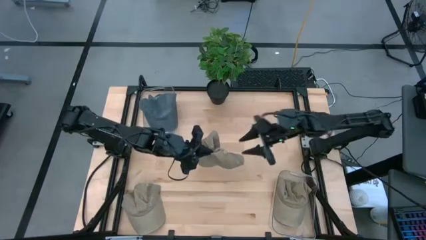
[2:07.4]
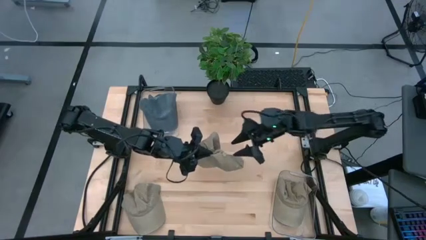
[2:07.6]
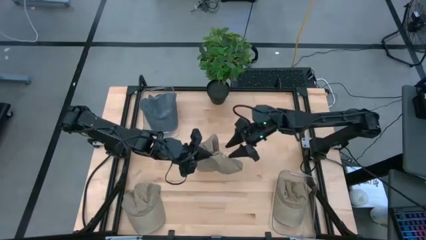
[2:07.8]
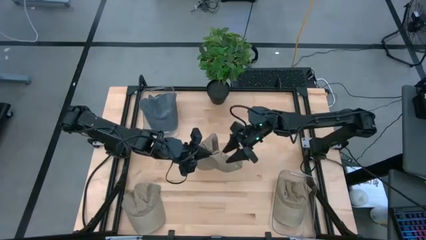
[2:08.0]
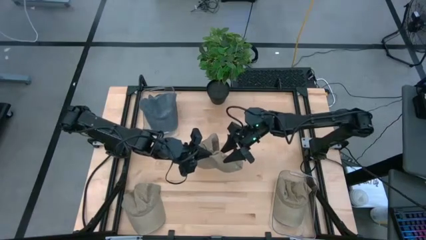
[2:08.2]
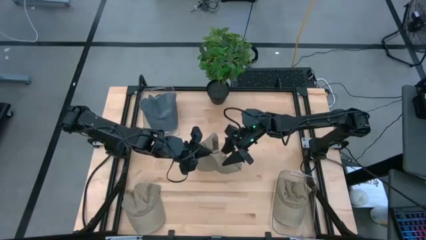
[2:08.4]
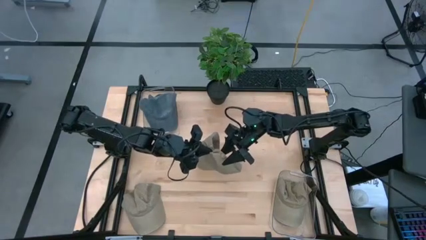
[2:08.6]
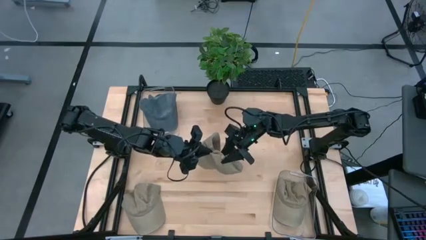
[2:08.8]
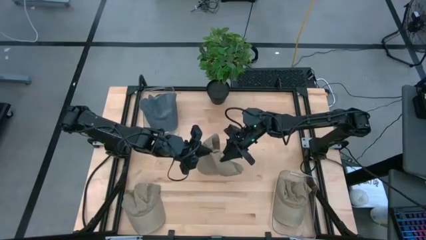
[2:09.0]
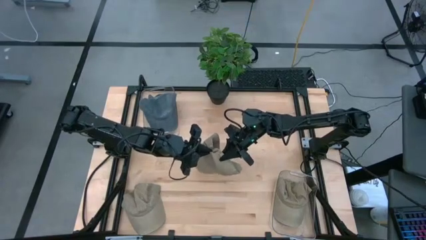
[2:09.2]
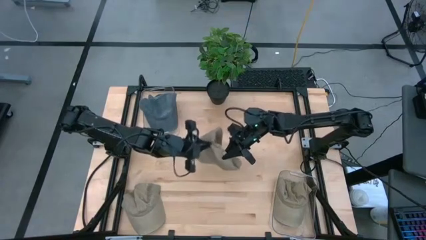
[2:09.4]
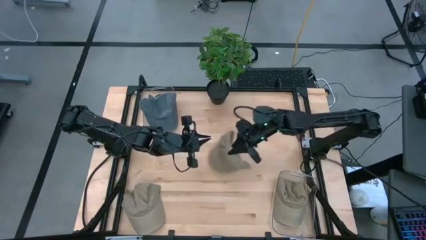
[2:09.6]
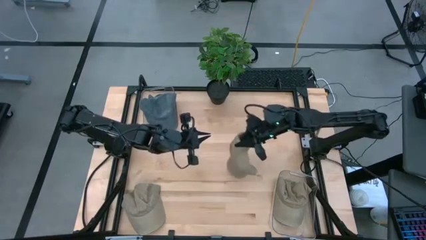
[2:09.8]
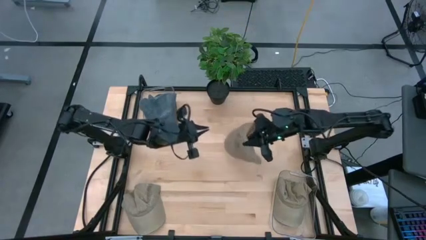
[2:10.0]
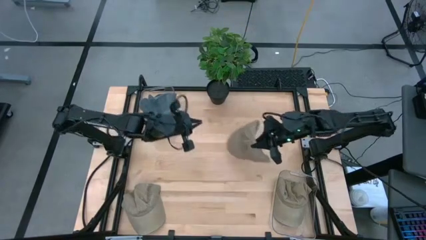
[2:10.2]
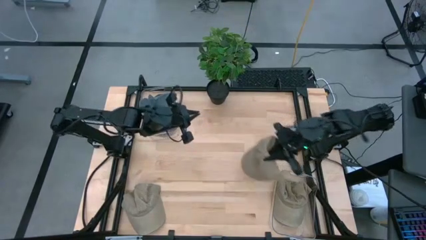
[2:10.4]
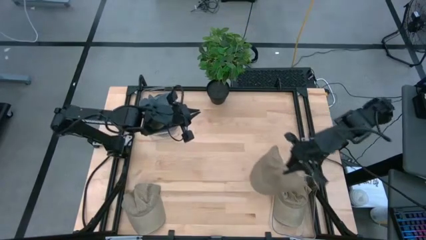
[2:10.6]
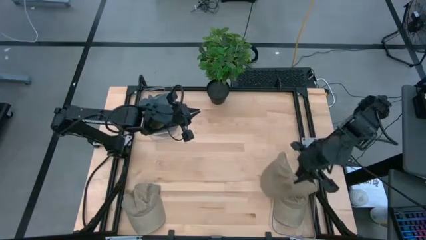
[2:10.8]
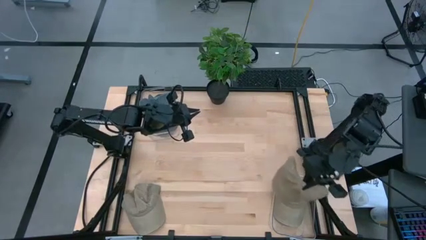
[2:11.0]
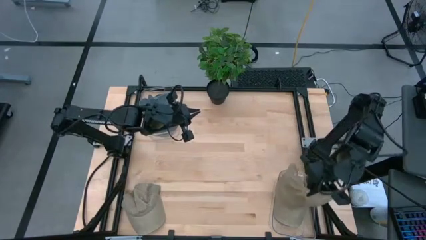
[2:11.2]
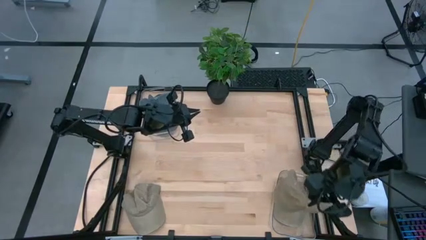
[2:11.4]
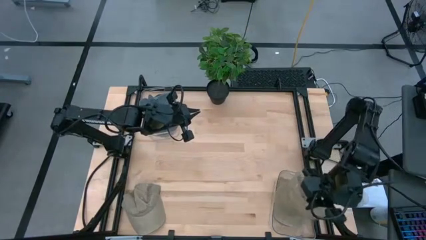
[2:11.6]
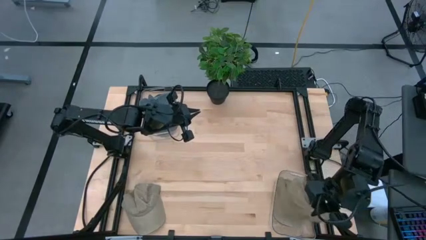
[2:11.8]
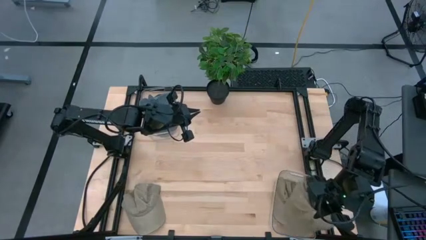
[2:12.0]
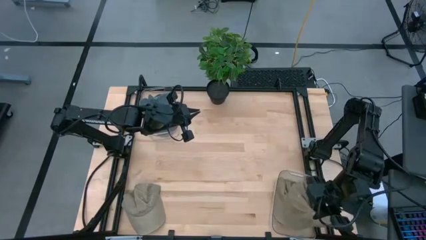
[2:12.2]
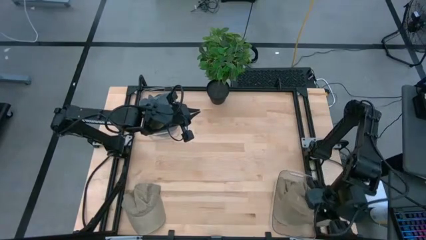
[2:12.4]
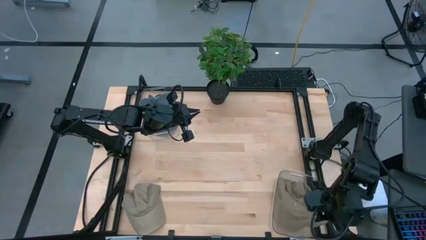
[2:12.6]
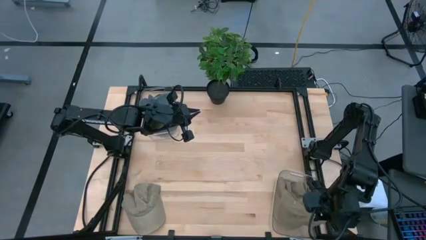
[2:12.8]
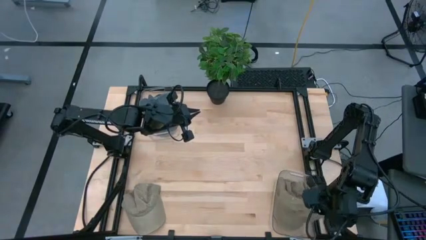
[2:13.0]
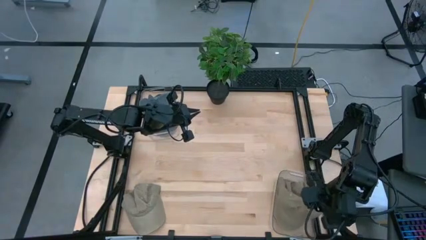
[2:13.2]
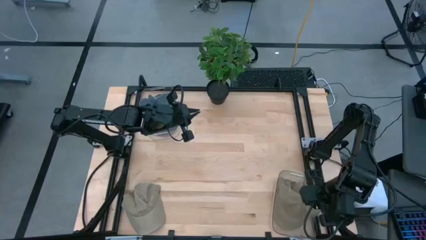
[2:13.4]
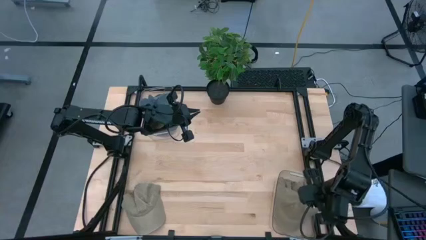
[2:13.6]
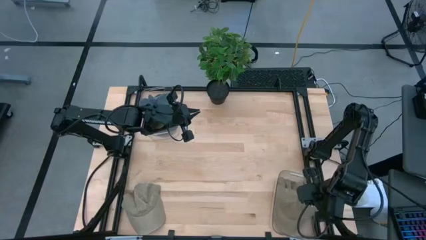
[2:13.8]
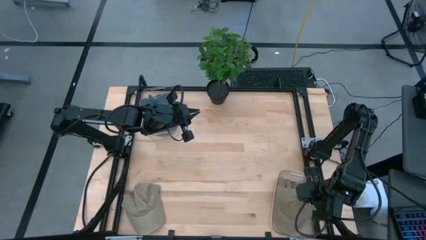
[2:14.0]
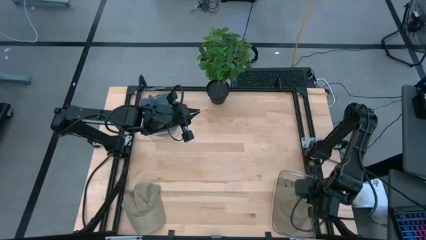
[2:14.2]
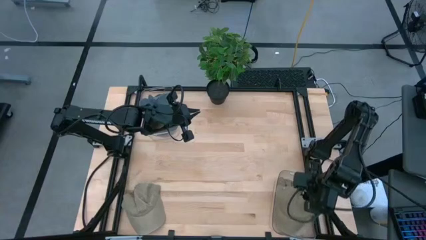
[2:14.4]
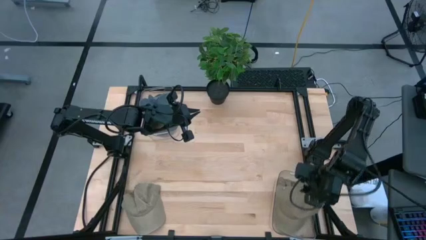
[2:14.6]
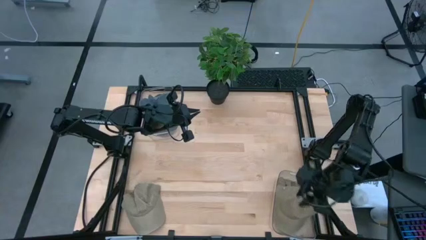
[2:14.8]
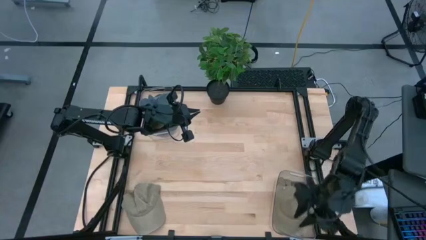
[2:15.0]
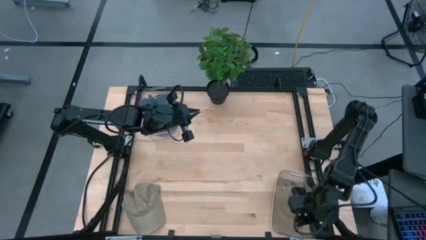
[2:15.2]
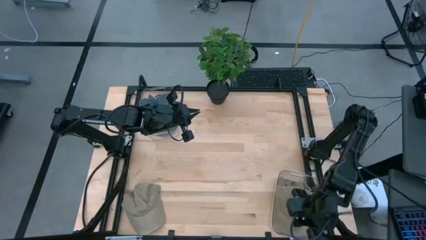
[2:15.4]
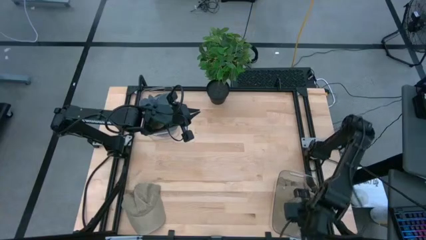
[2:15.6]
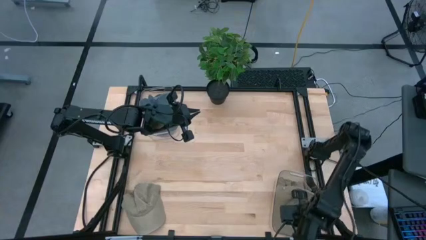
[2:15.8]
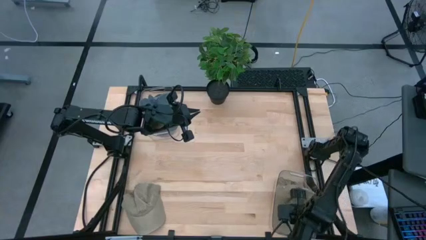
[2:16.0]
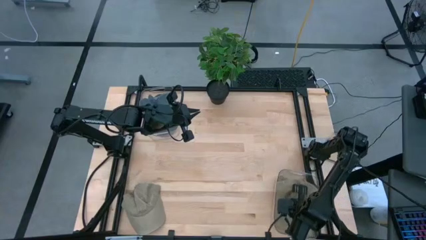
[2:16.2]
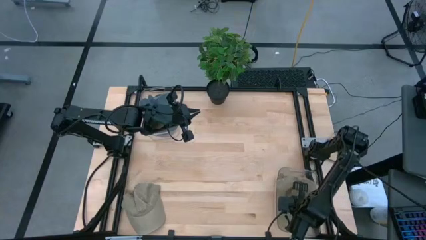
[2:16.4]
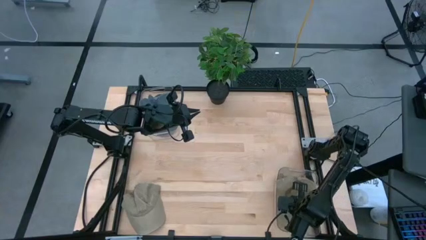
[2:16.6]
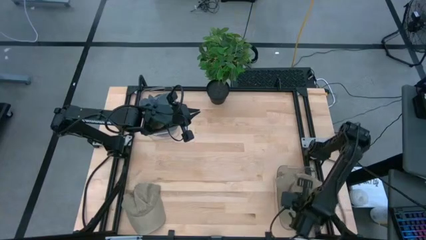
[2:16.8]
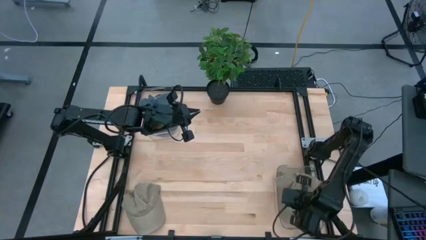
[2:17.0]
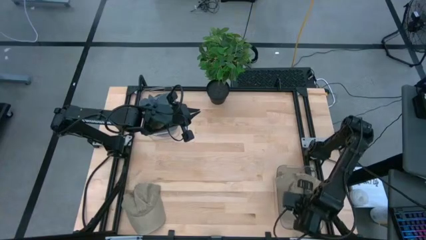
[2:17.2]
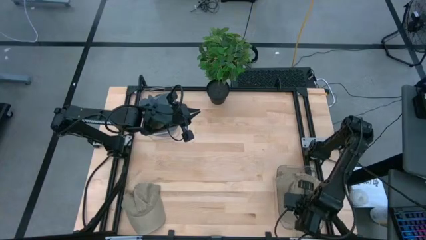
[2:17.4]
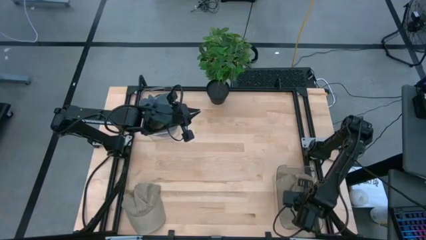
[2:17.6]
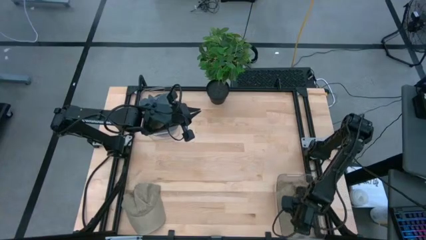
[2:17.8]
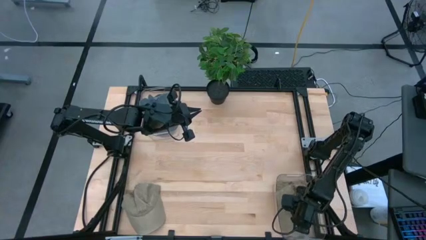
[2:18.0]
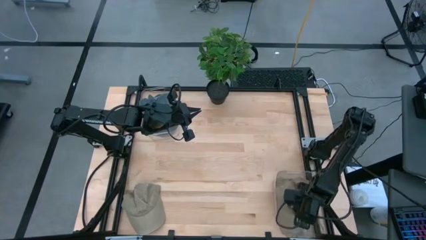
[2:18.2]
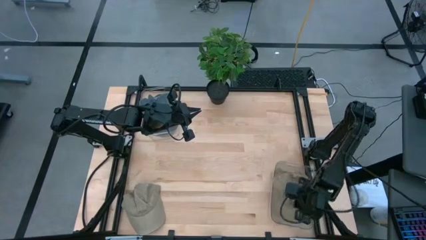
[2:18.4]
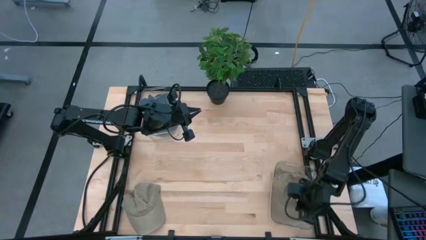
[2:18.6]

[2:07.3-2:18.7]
Task: Pick & Place hat
Put the right brown cap into the right transparent bin

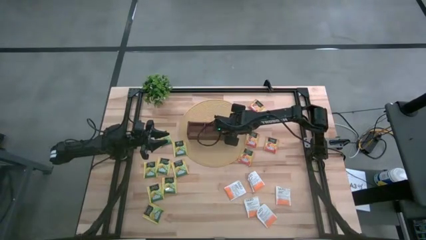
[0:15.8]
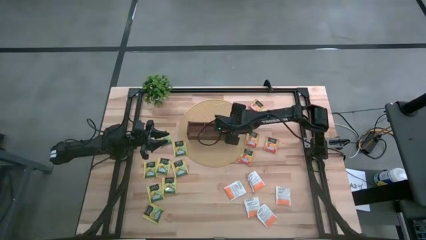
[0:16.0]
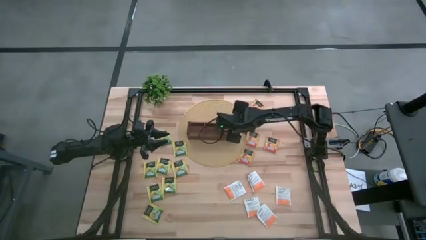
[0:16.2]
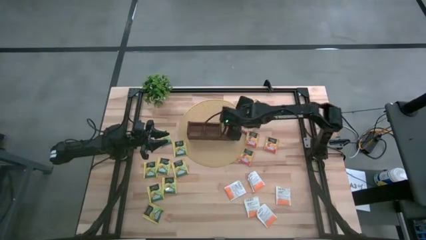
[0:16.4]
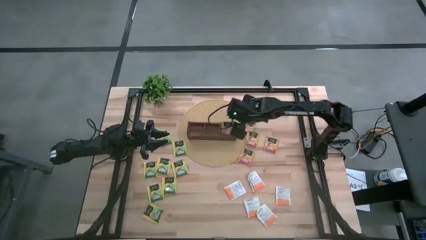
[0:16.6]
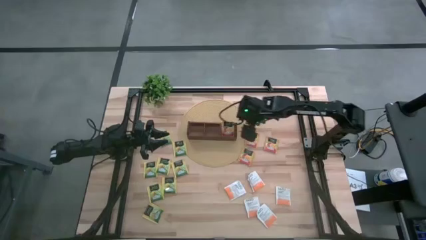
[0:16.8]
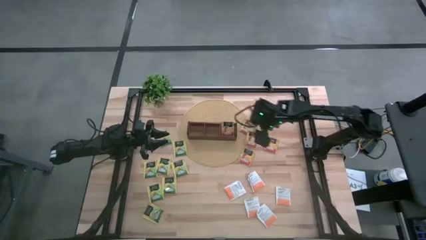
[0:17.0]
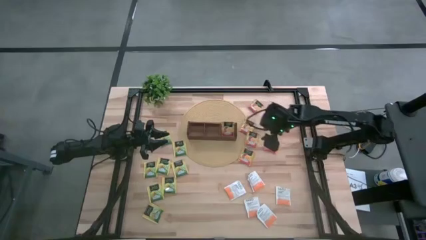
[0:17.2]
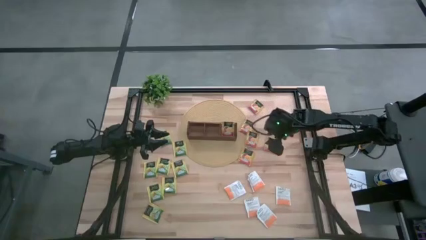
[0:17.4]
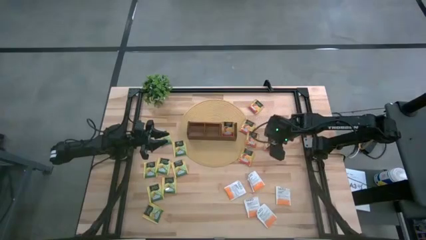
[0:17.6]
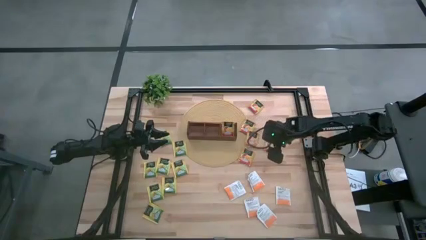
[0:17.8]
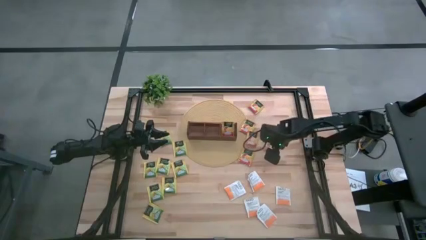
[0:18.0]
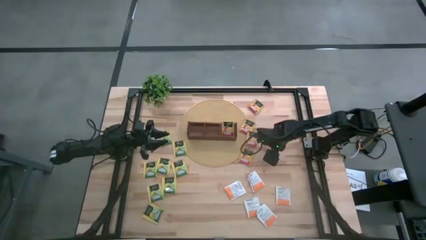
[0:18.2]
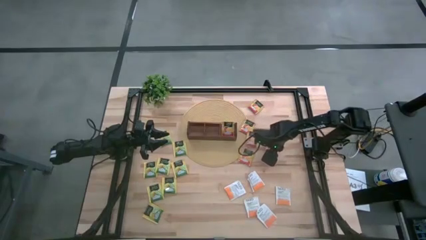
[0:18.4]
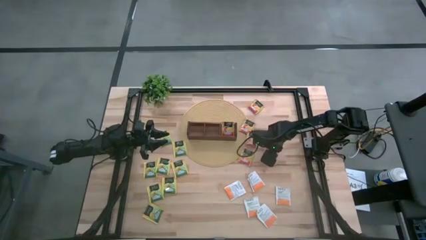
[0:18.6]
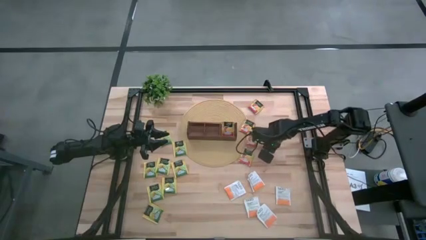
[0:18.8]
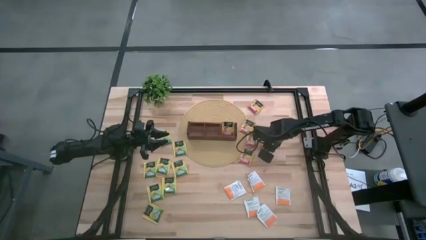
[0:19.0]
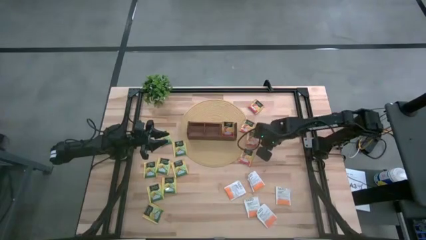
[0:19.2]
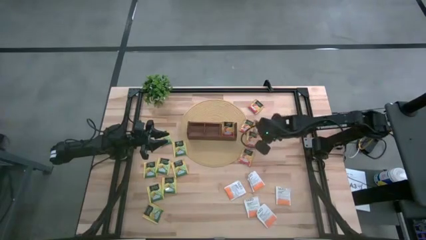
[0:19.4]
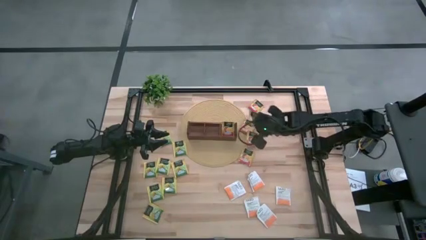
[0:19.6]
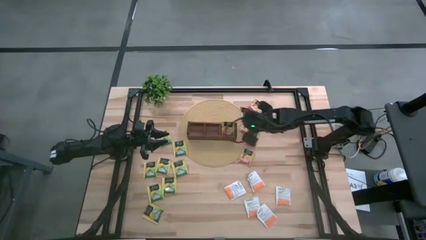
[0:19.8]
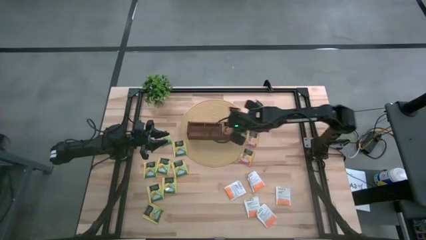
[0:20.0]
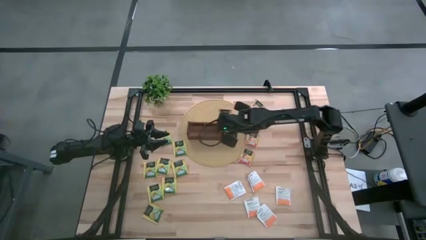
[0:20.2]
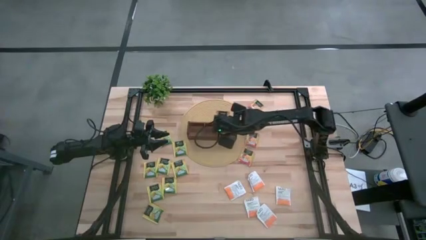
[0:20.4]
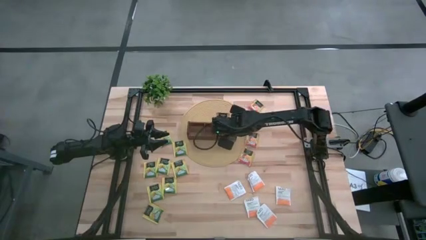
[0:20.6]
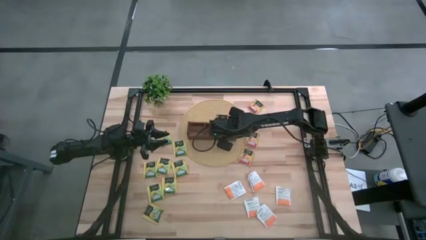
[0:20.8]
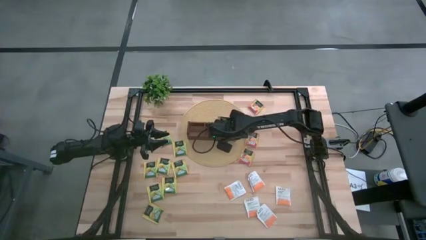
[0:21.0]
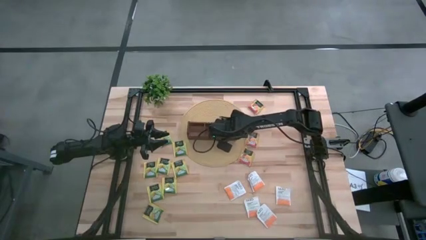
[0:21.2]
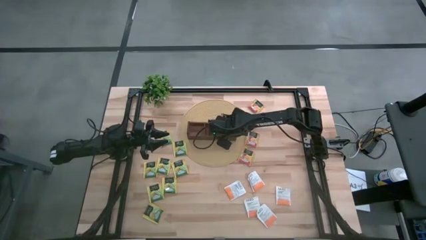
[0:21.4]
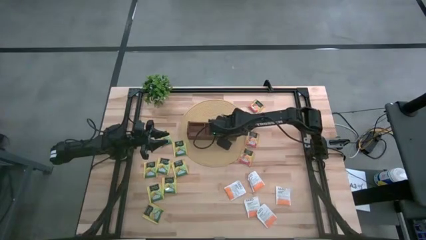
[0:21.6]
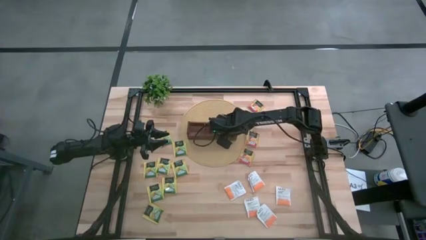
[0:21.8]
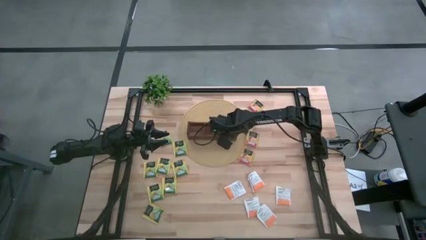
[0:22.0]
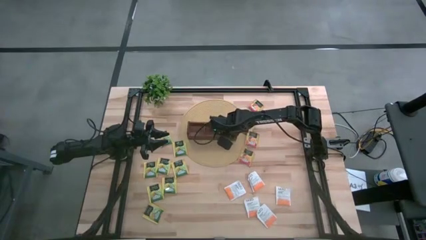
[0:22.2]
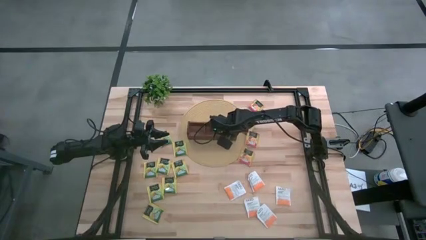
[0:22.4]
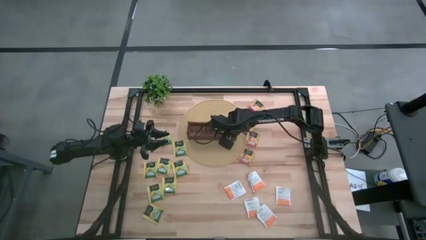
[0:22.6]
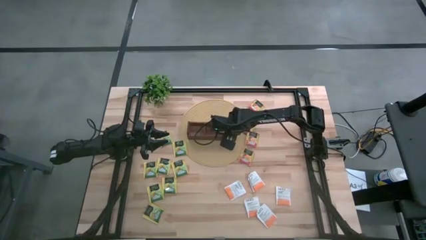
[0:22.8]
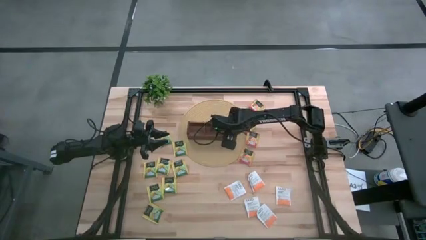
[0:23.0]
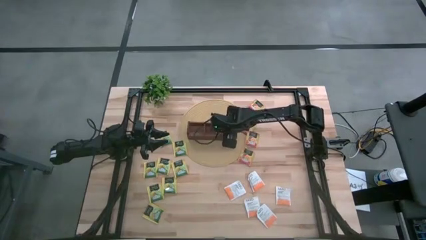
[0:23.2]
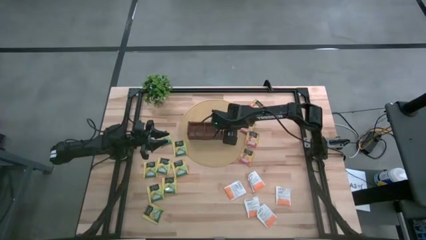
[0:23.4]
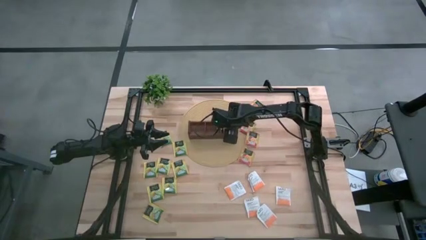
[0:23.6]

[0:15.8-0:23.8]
Task: Pick & Place Tea
Put the dark yellow tea bag into the right section of the wooden organizer
